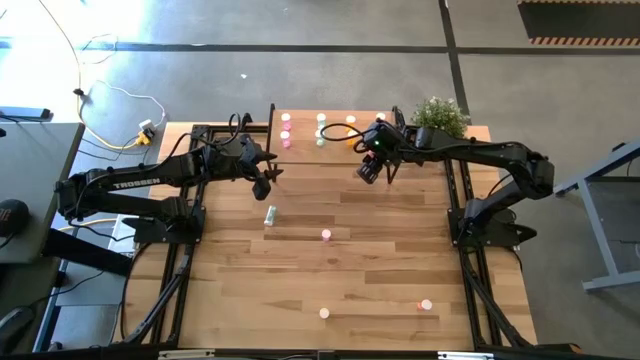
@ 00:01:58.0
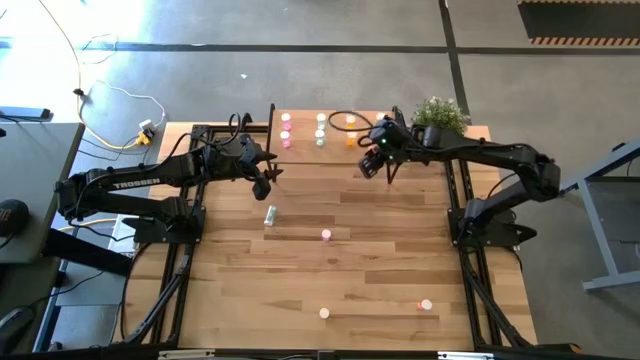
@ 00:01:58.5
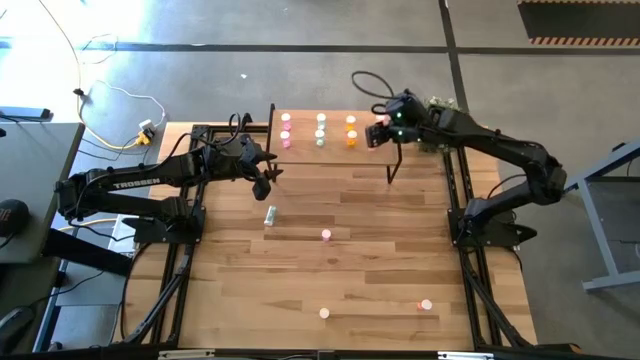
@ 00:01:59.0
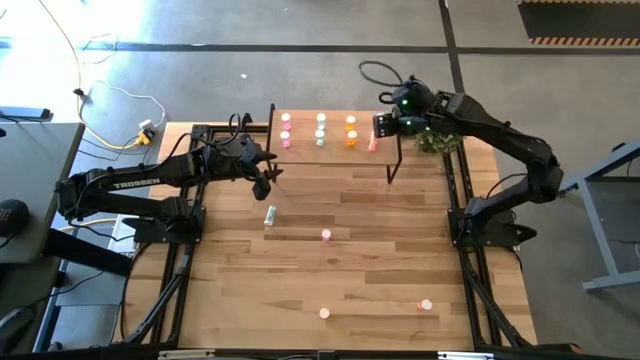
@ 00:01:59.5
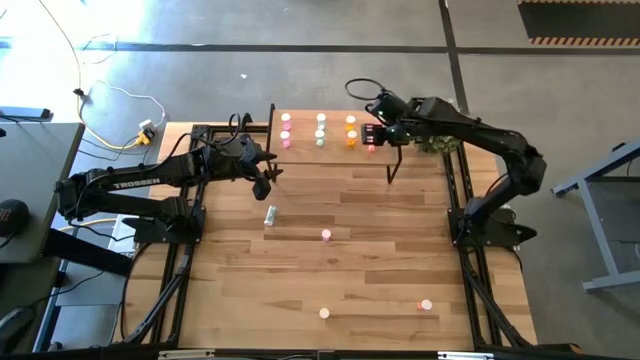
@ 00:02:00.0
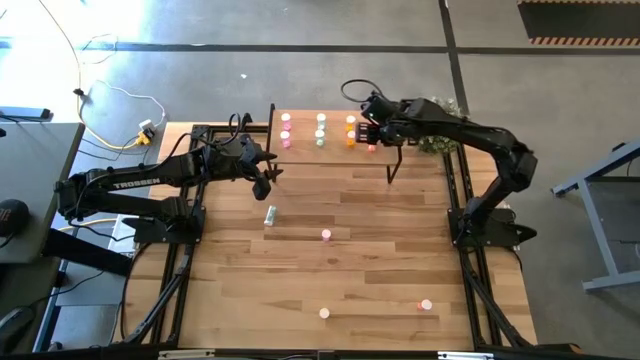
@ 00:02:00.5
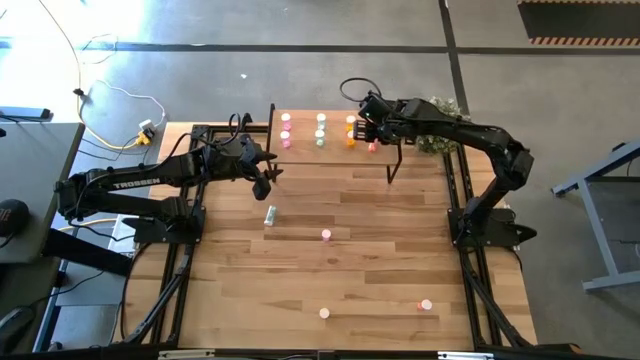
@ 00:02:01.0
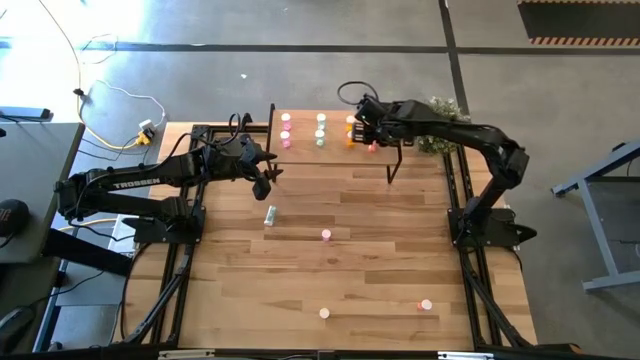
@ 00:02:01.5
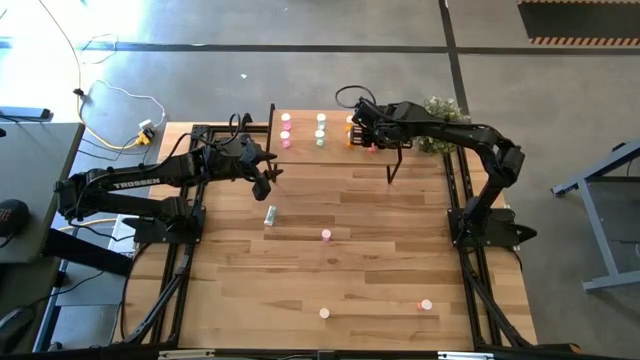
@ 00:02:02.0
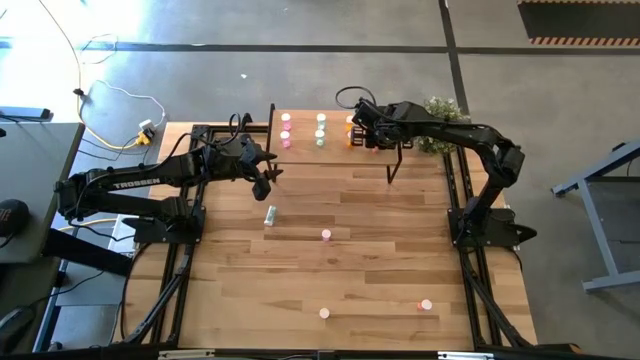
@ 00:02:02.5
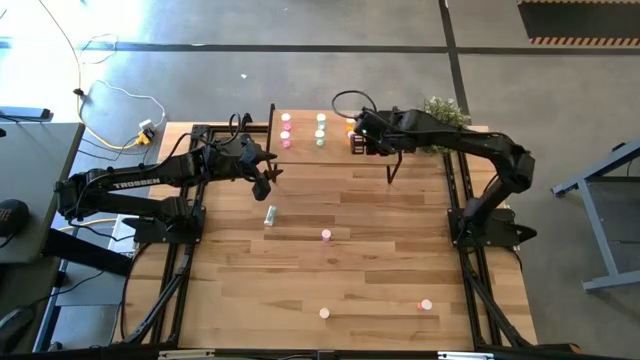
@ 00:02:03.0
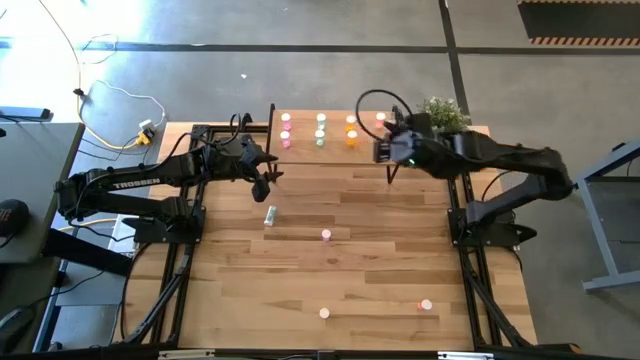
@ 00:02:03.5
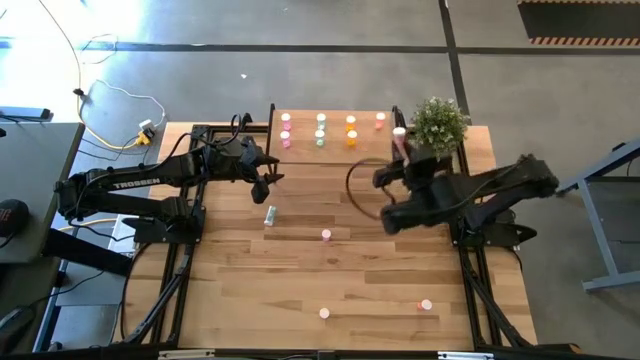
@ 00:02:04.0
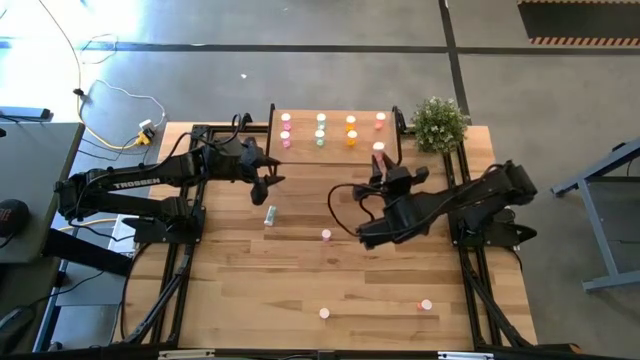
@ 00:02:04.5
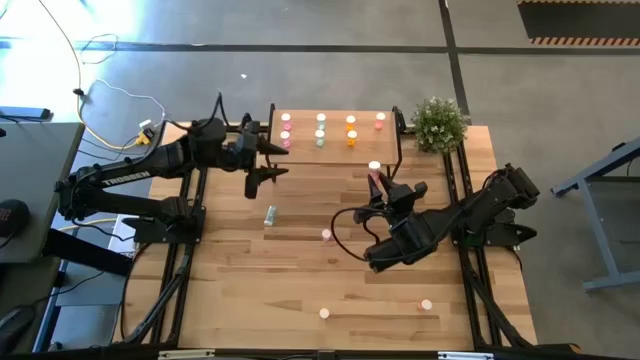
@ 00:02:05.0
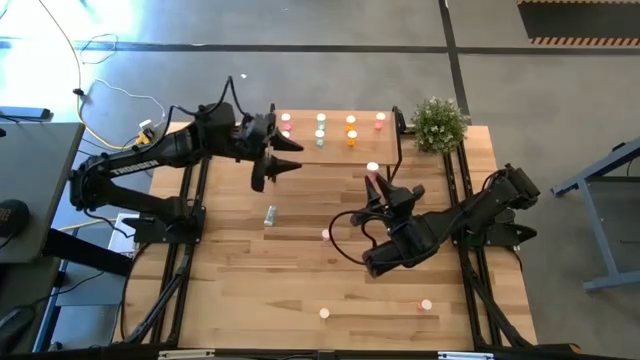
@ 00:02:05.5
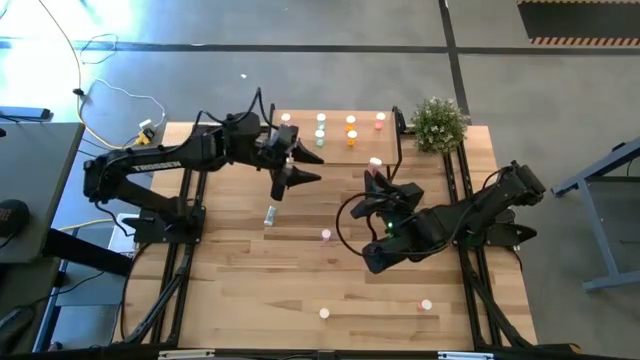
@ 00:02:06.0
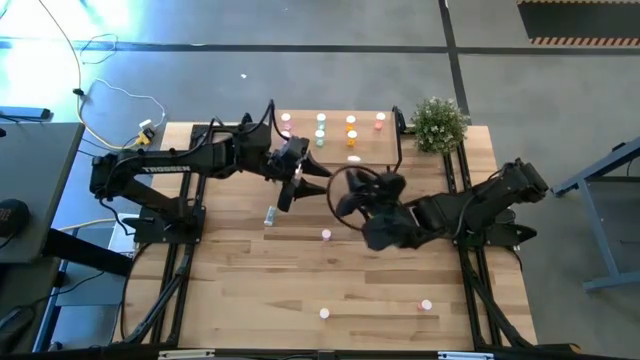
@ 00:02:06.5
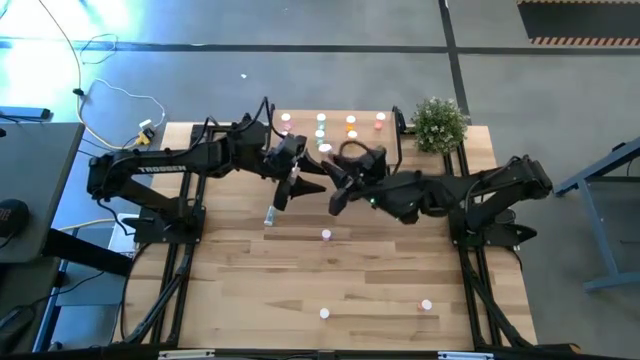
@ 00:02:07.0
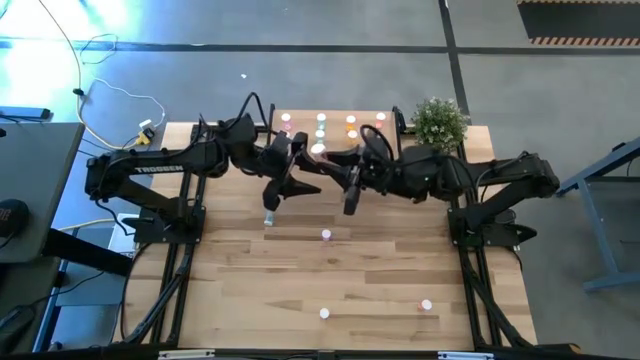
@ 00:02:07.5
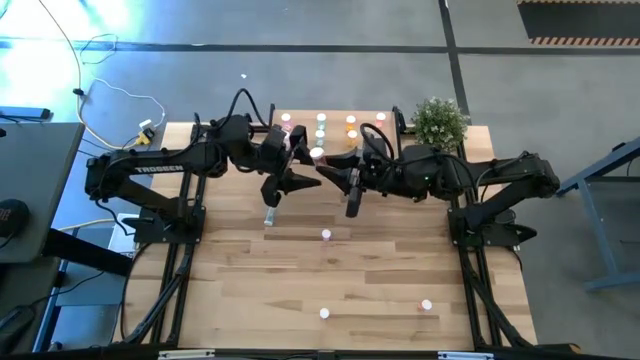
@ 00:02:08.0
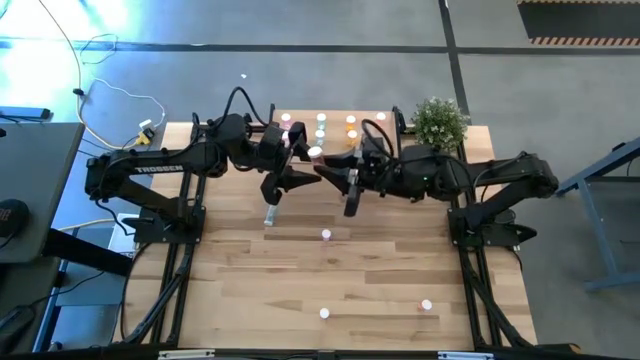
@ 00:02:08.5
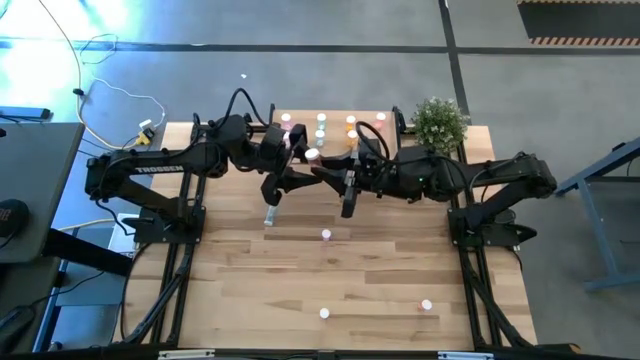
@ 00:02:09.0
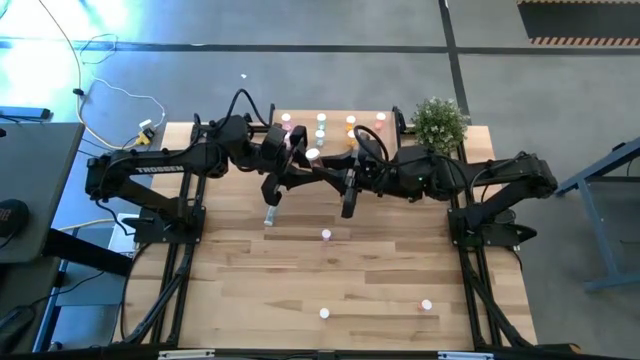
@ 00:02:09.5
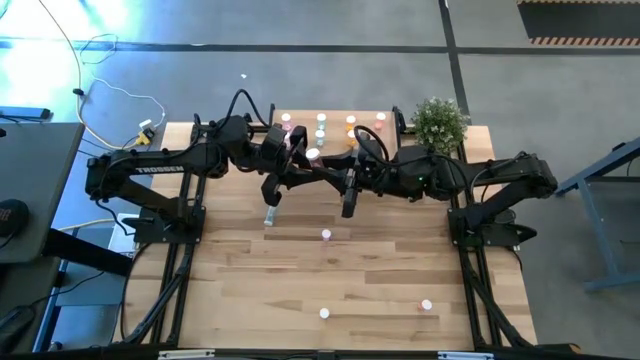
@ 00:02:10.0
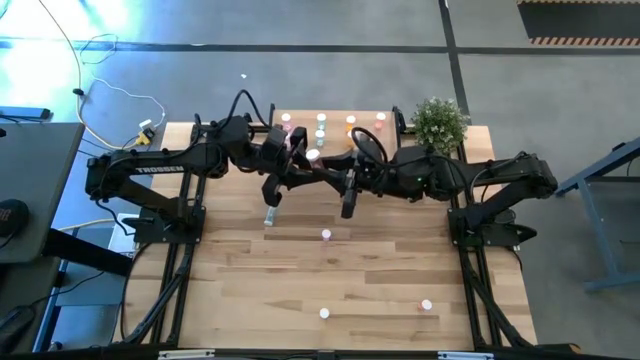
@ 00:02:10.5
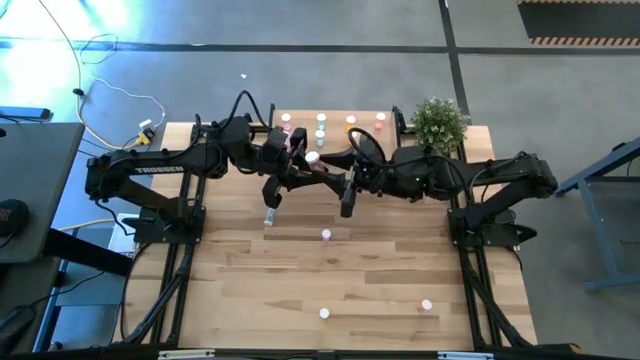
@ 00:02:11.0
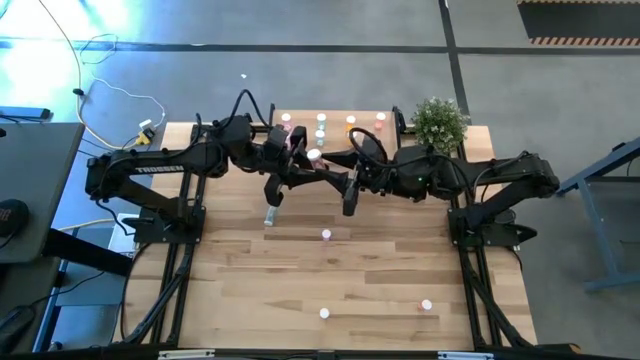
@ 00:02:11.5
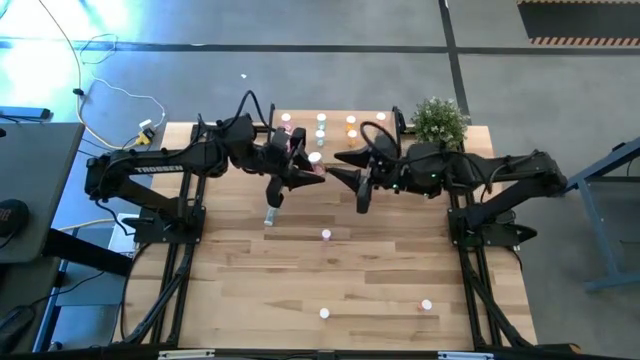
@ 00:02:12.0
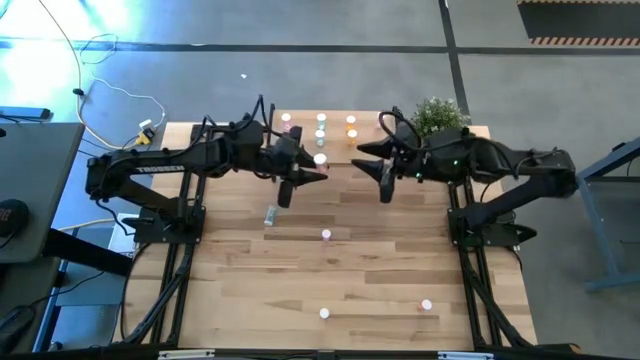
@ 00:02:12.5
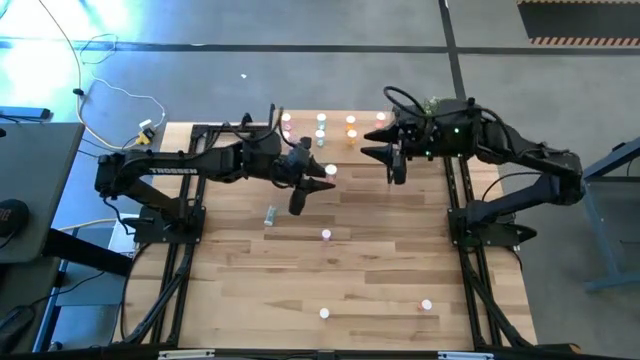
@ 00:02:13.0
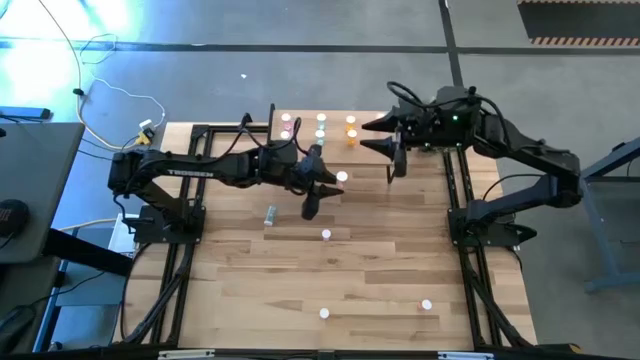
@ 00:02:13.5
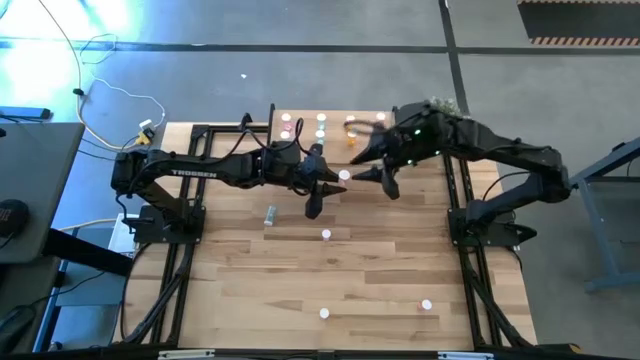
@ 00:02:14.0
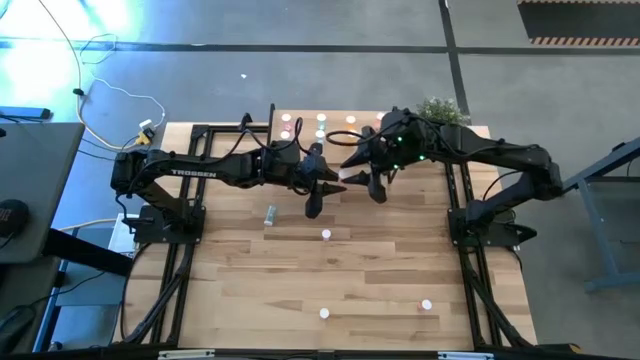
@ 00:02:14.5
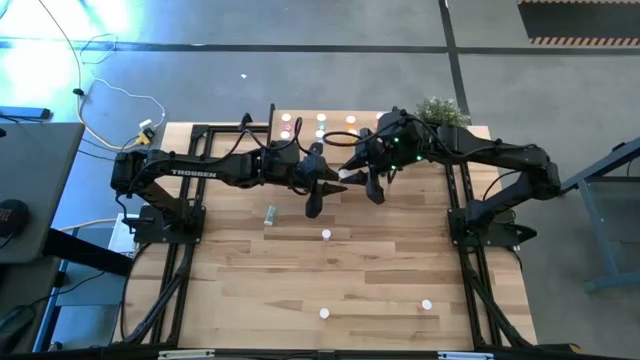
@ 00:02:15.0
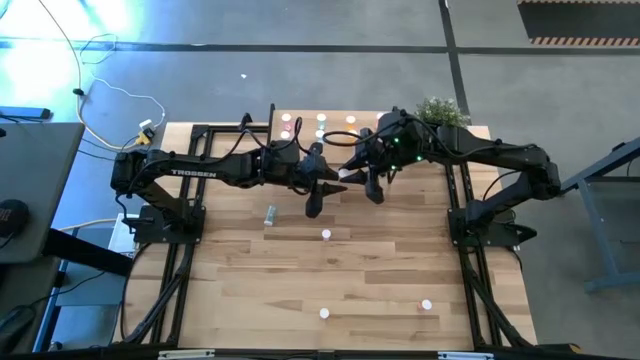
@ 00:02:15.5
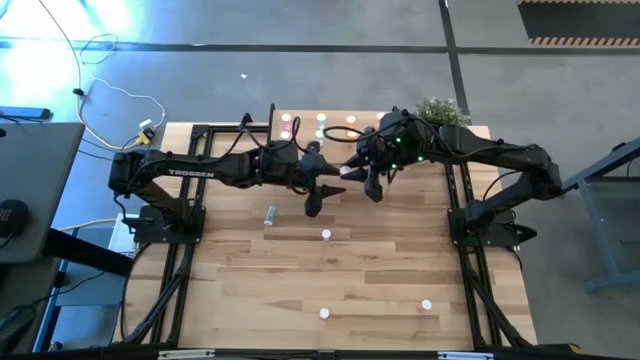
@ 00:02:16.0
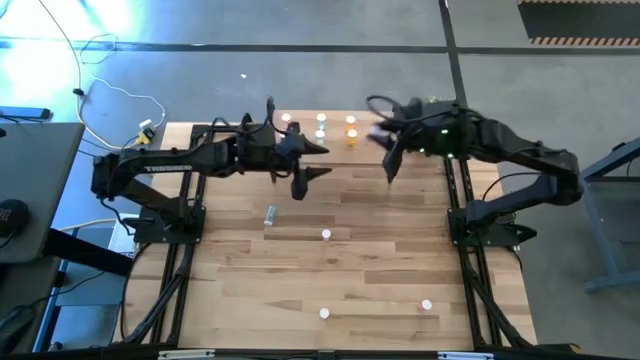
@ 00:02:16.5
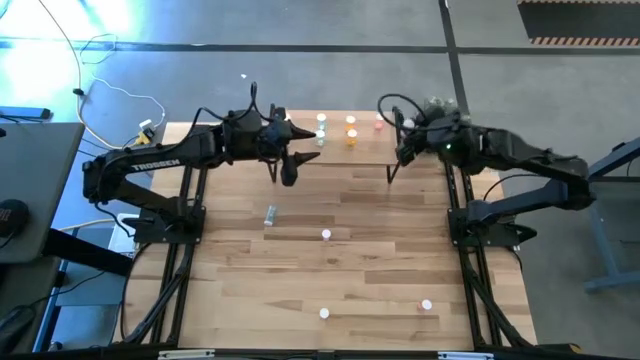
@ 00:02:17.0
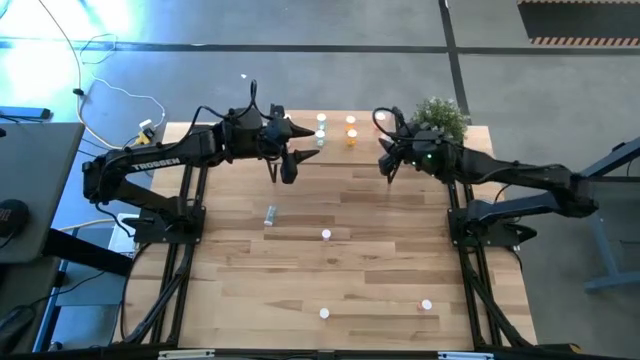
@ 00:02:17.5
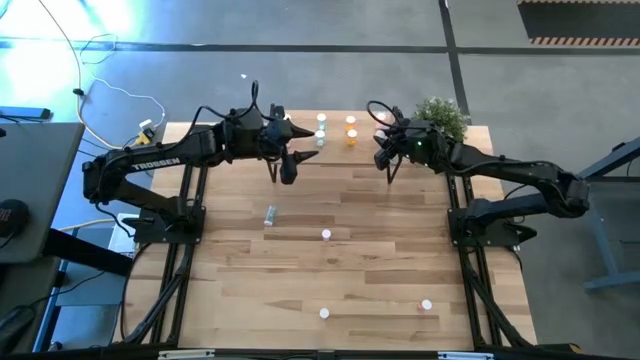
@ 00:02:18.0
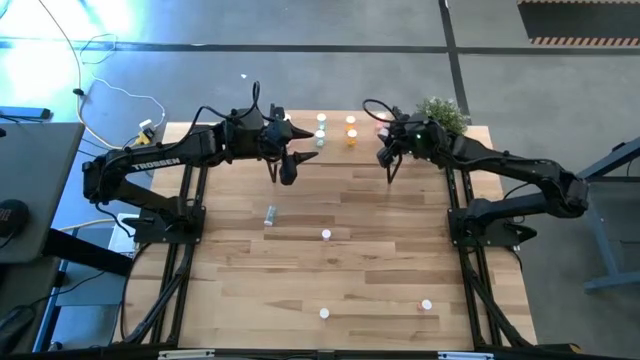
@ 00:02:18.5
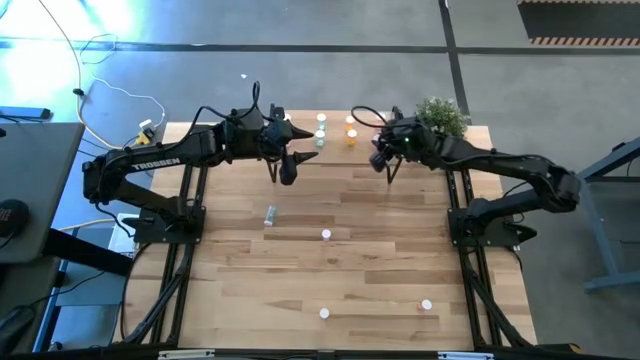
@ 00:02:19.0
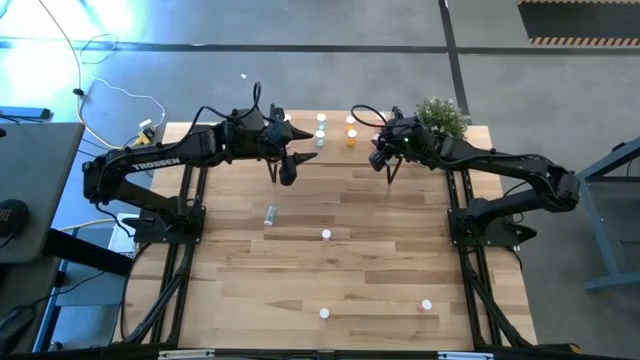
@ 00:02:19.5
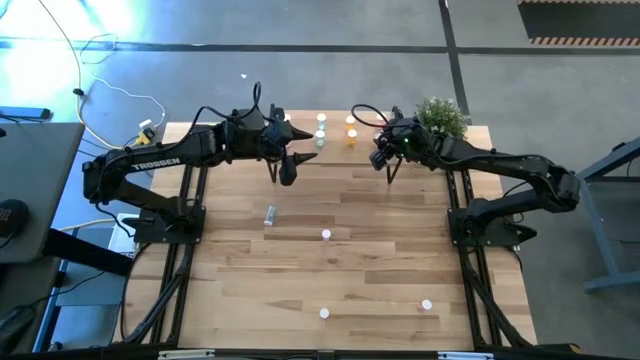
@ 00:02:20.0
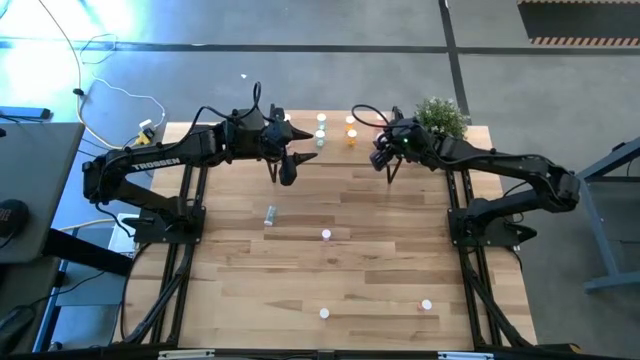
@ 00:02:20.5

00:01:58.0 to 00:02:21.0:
Task: Pick and place medicine bottles onto shelf by color
Adjust the orange pill bottle
